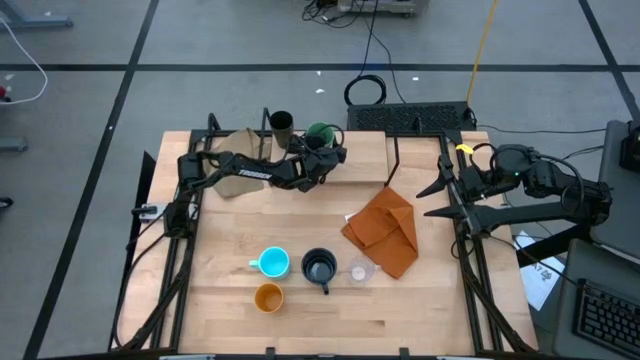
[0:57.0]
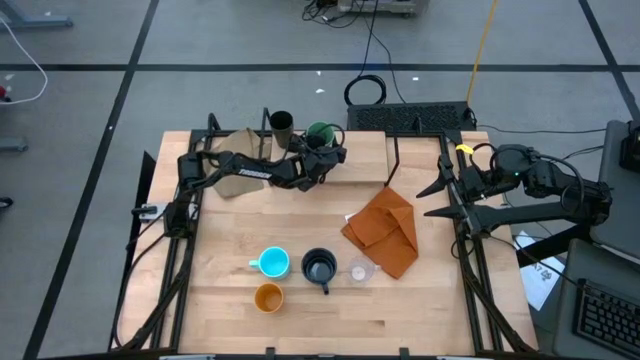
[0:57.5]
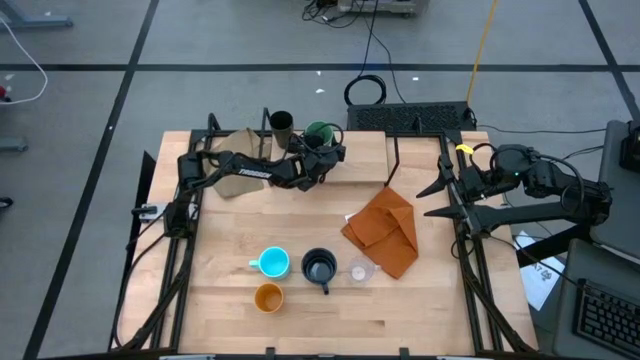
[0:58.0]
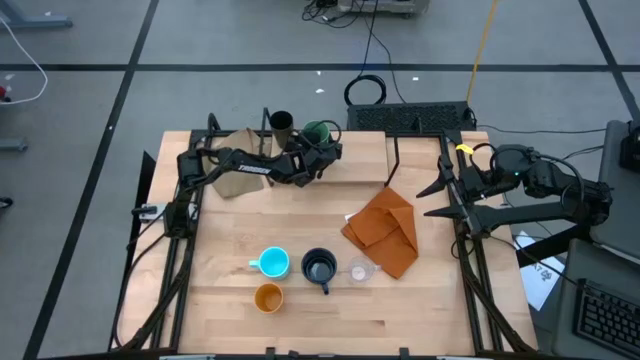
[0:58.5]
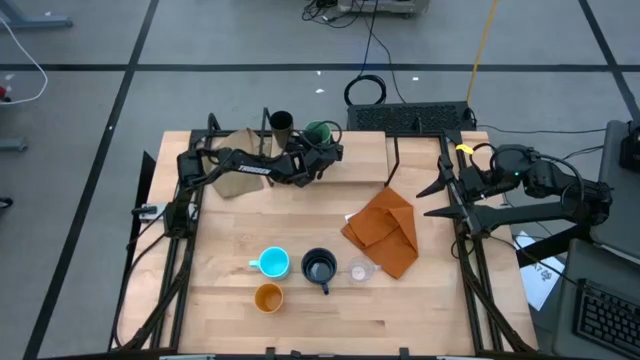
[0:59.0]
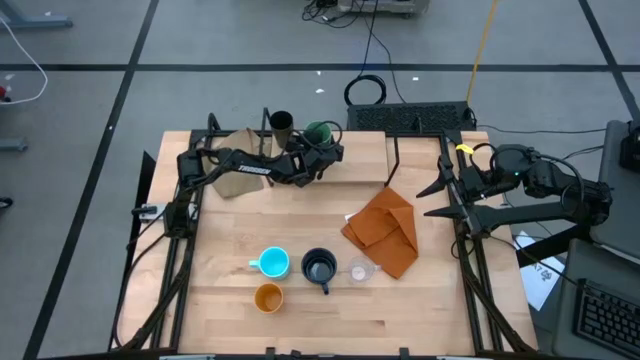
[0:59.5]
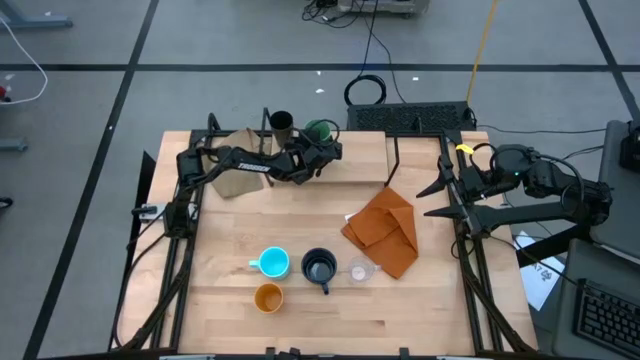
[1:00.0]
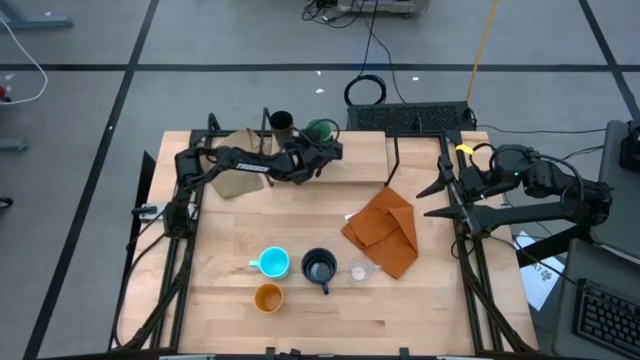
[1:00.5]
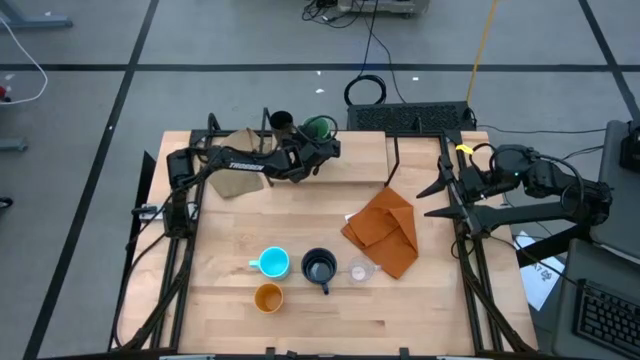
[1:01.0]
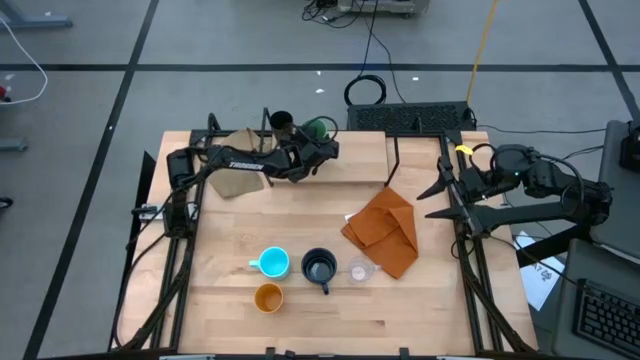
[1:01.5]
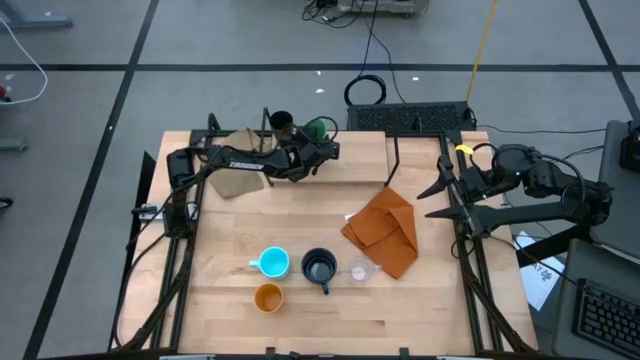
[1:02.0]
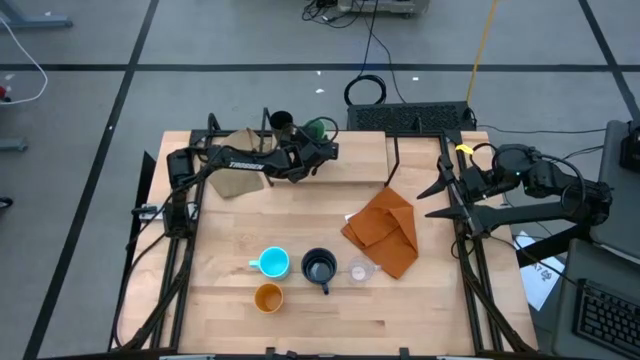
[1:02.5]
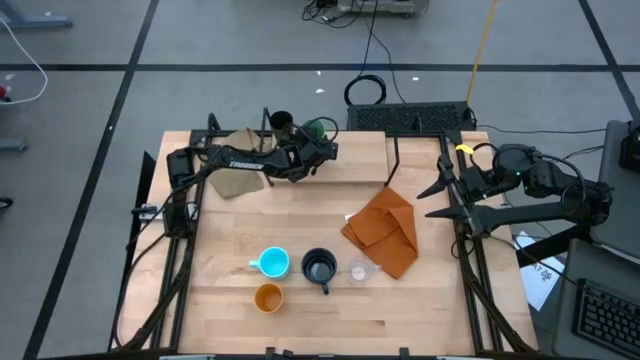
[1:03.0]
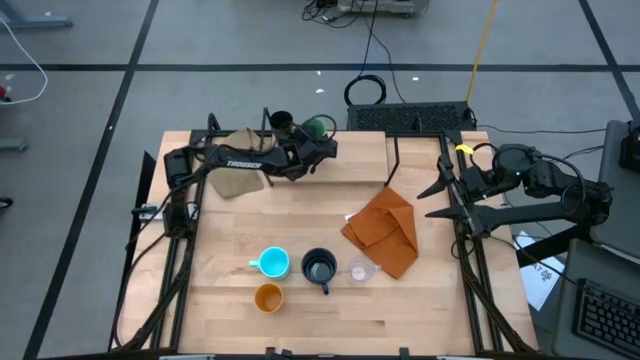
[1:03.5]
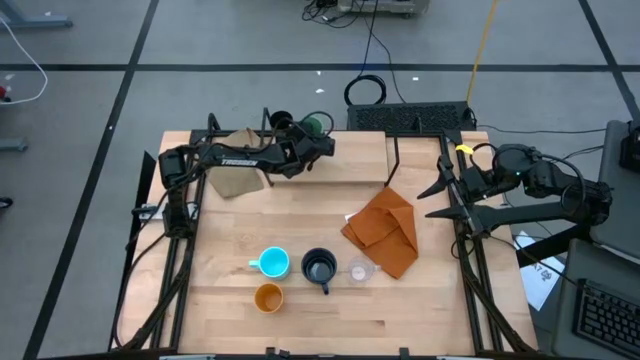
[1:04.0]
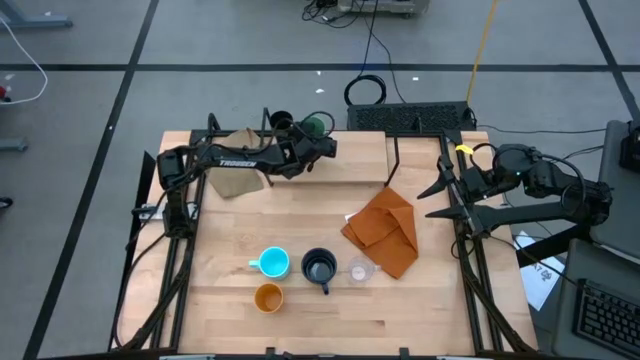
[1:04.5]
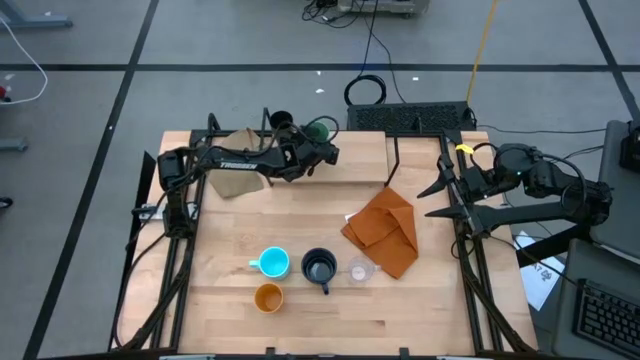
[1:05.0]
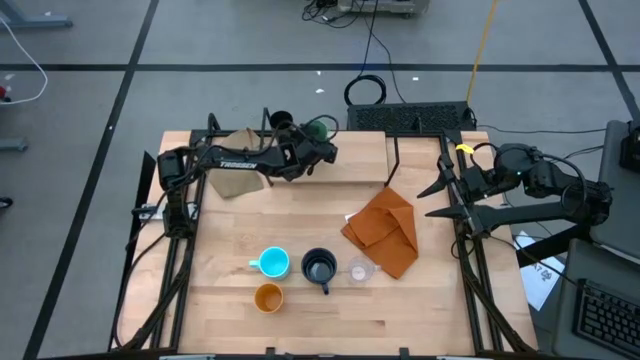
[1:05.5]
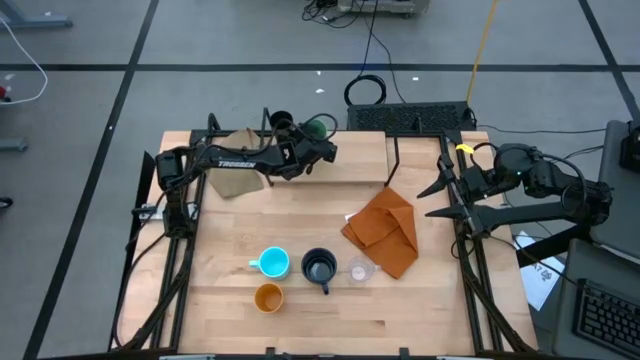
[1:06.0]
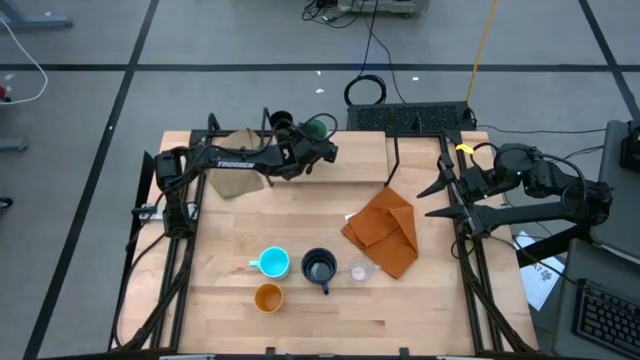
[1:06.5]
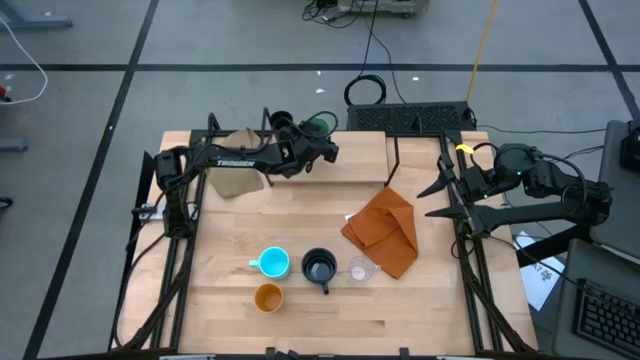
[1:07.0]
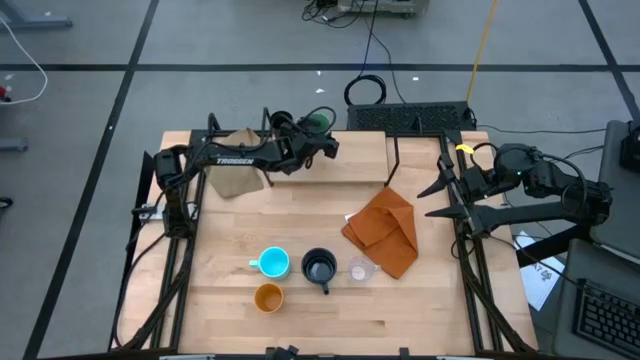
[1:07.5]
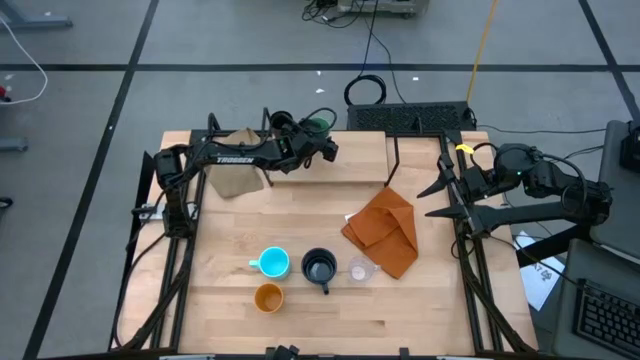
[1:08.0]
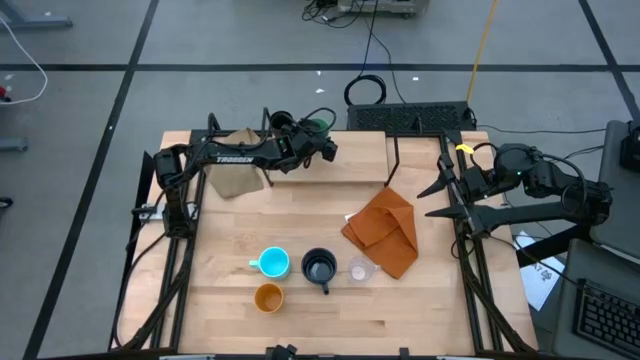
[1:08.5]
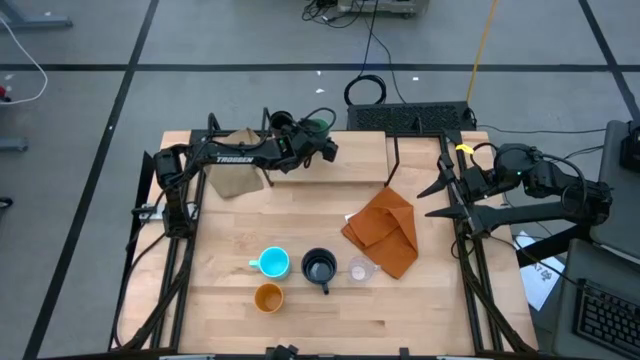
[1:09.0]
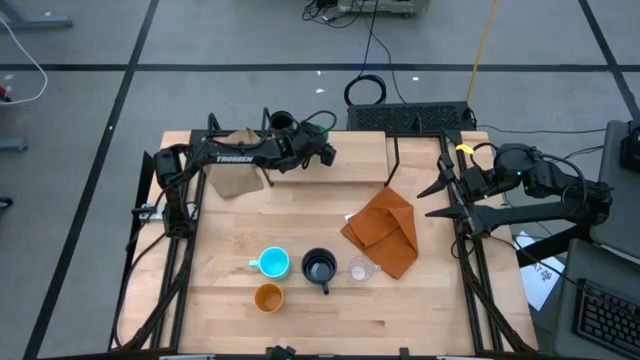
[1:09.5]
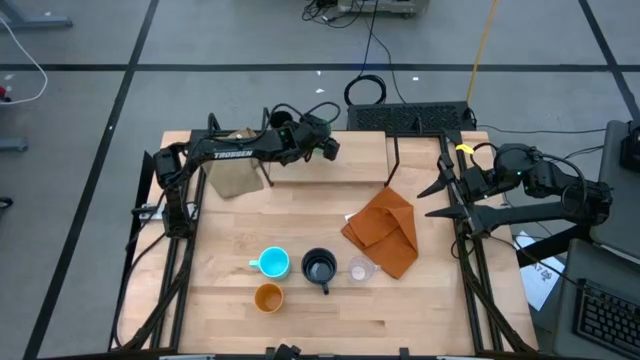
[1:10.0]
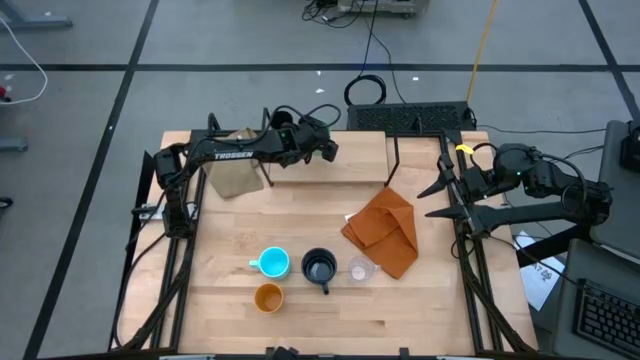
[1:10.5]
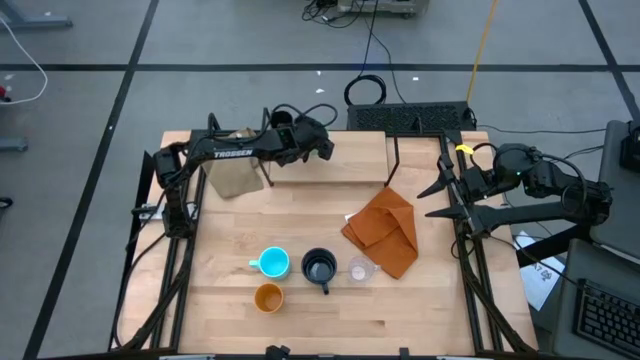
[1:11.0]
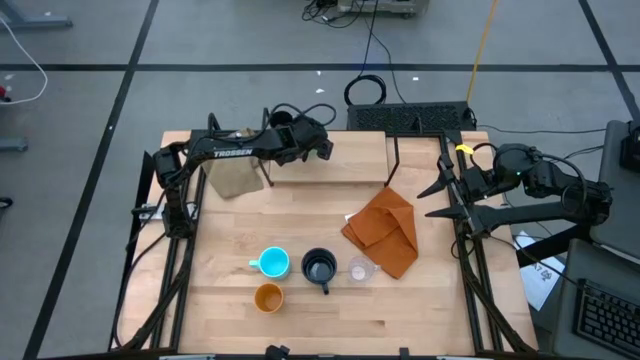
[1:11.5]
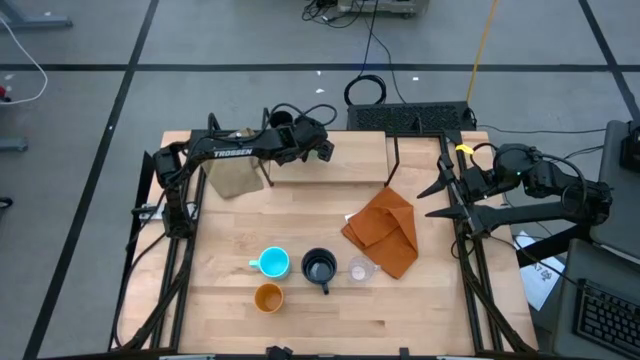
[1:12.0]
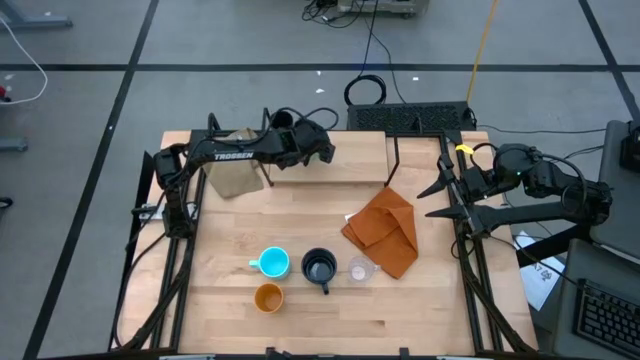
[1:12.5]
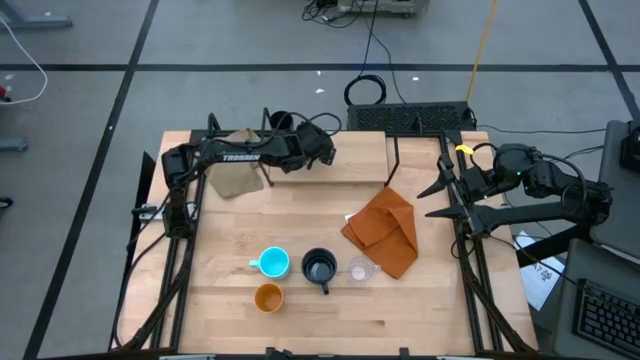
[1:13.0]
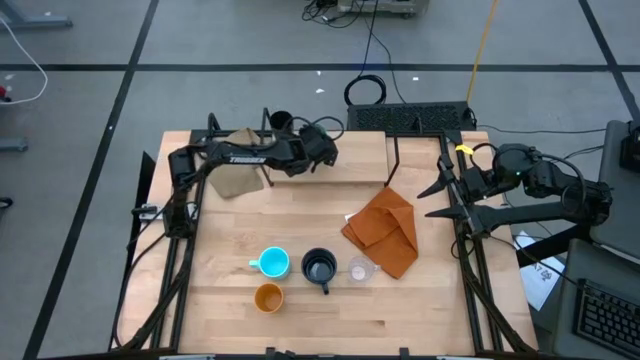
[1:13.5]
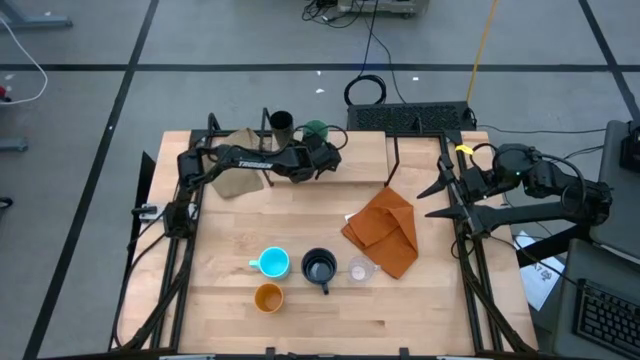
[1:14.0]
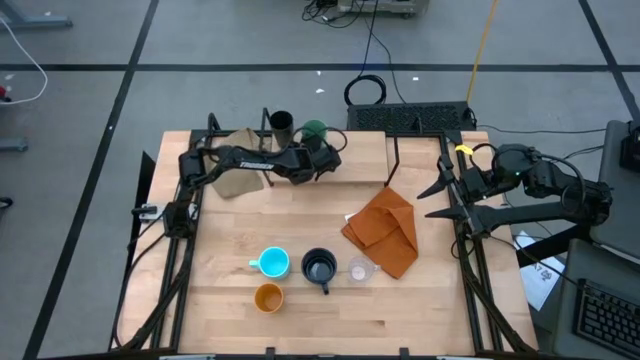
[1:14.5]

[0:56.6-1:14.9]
Task: Stack small to large cups/mugs on shelf
Put the green cup on the shelf

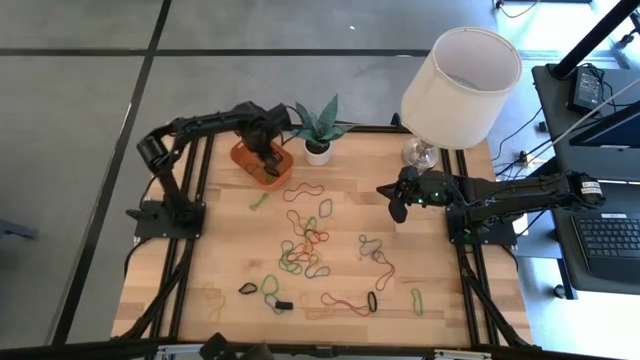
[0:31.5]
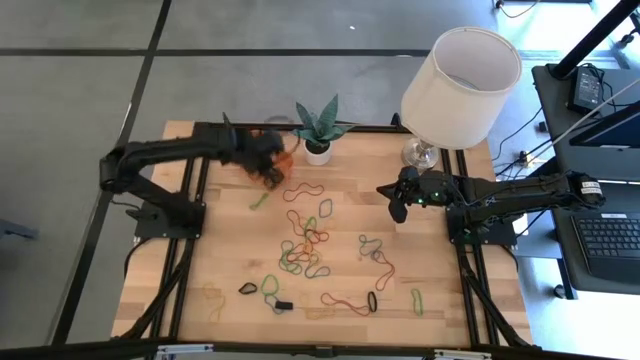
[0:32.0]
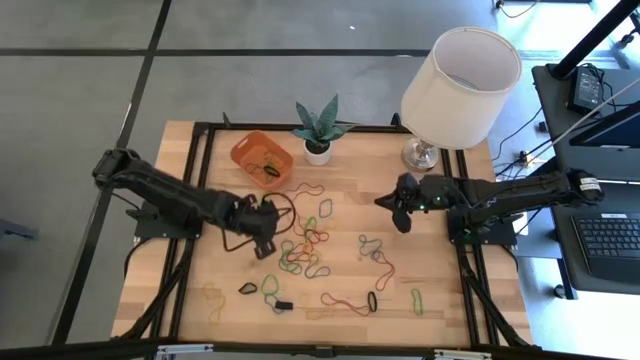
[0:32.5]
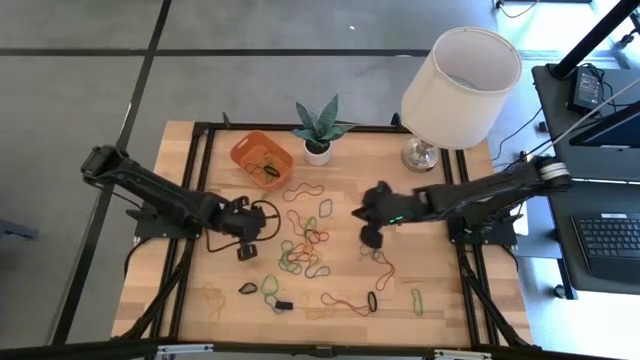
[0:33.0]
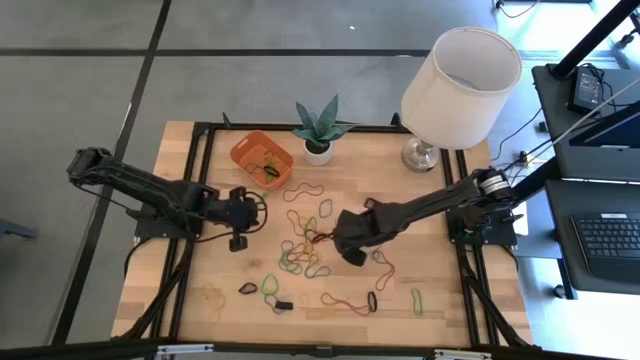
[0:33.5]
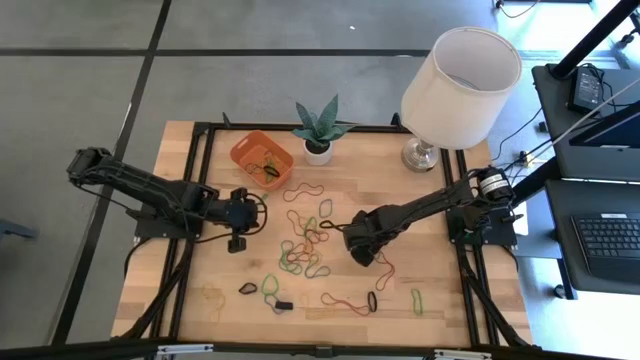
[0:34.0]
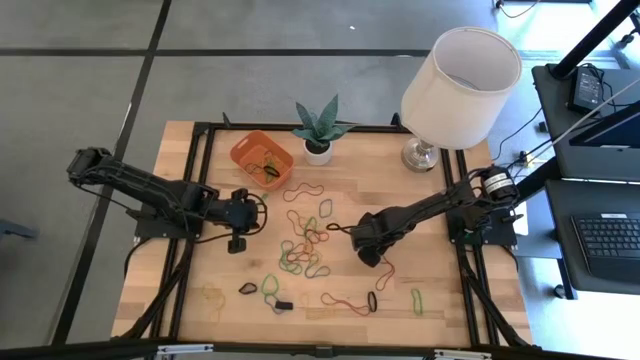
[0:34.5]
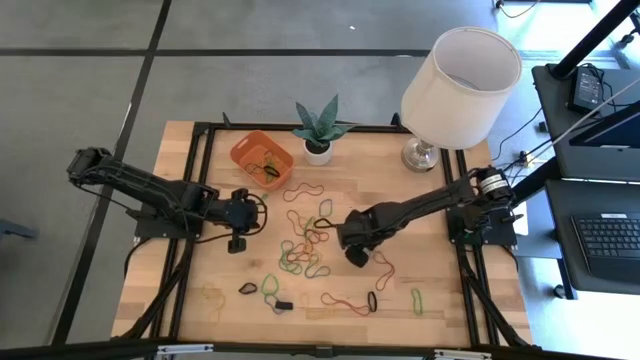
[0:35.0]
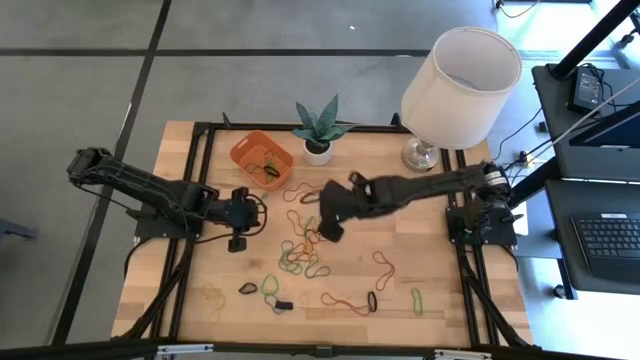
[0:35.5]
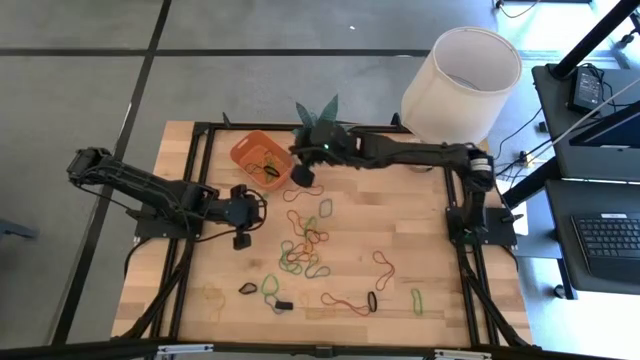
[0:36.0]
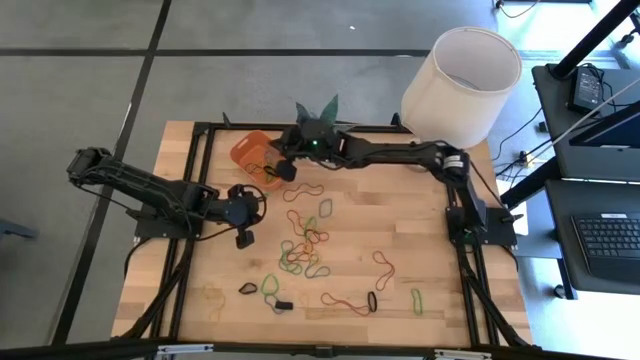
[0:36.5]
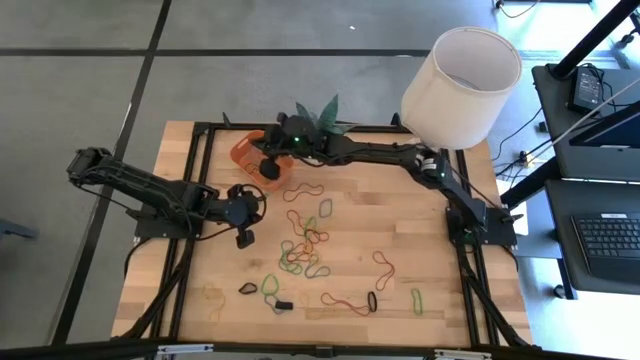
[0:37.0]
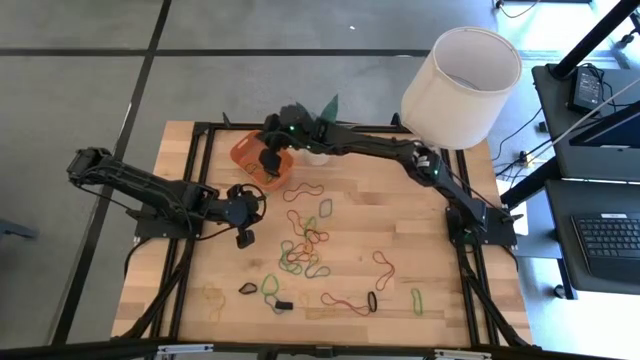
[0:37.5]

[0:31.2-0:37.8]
Task: Pick and place rubber bands into bin
Put the blue rubber band into the orange bin
